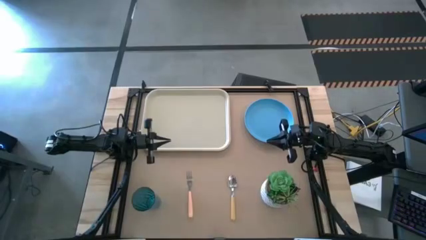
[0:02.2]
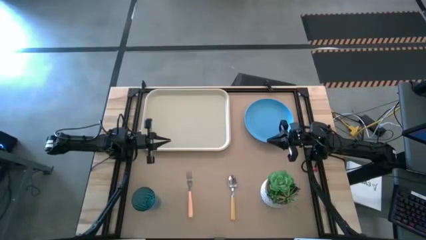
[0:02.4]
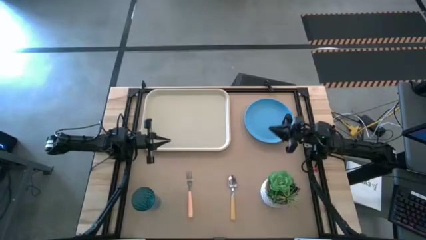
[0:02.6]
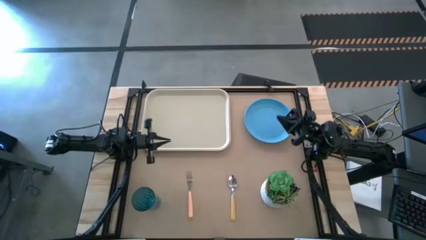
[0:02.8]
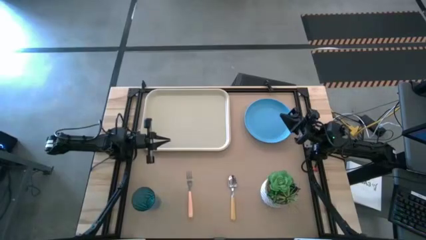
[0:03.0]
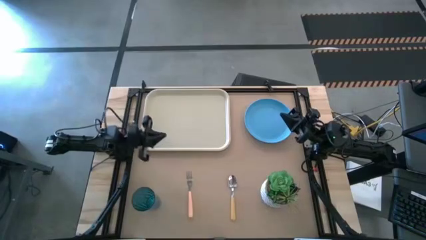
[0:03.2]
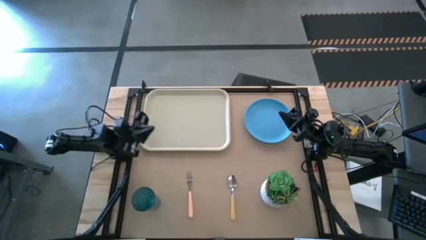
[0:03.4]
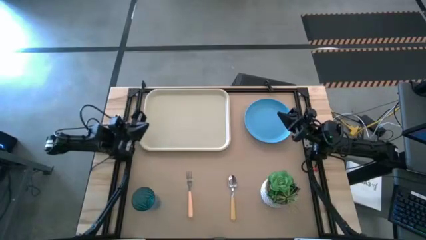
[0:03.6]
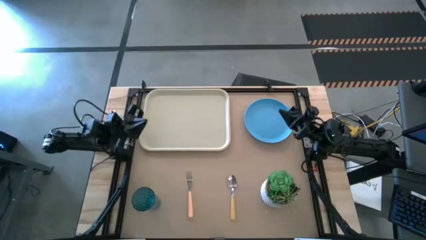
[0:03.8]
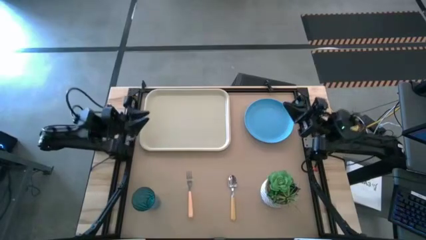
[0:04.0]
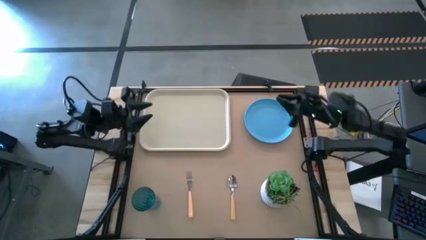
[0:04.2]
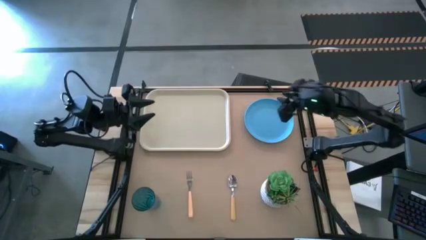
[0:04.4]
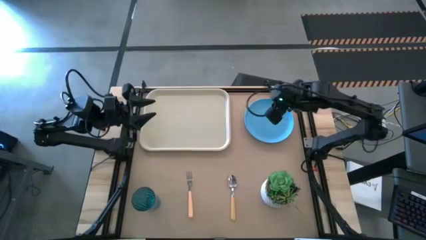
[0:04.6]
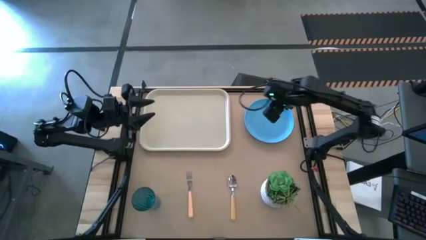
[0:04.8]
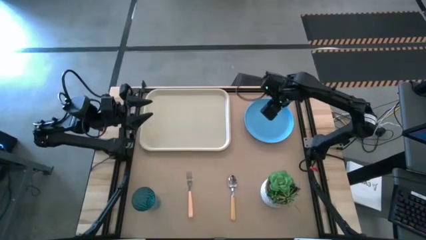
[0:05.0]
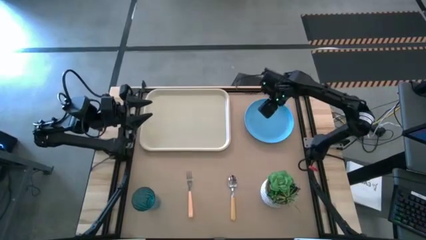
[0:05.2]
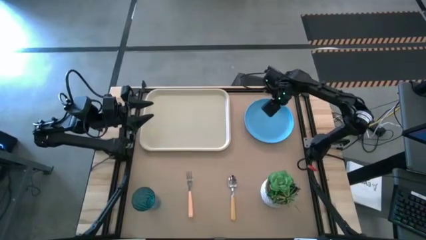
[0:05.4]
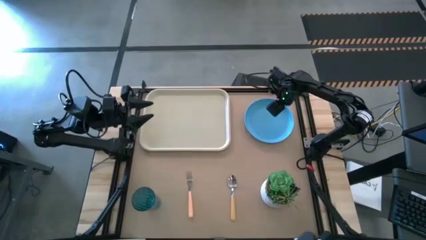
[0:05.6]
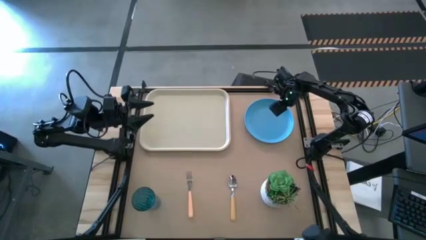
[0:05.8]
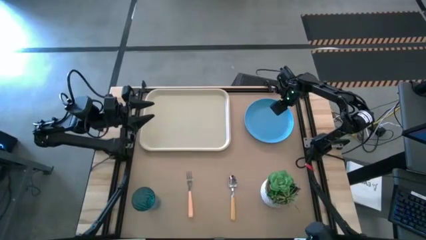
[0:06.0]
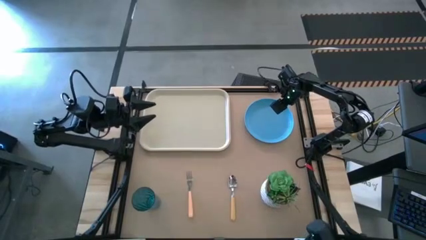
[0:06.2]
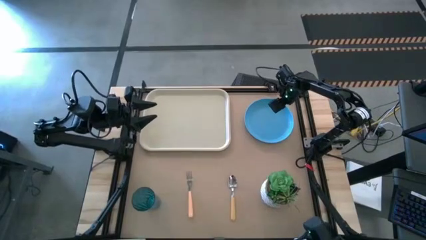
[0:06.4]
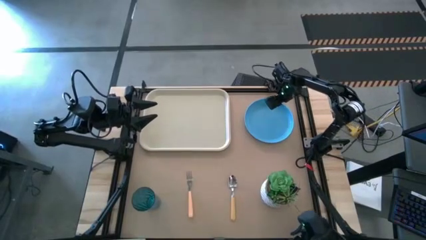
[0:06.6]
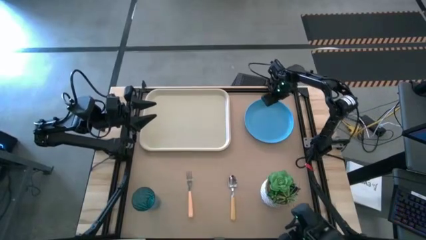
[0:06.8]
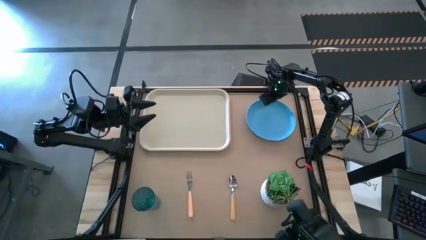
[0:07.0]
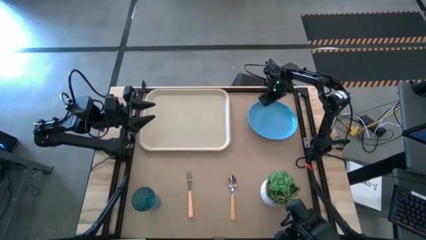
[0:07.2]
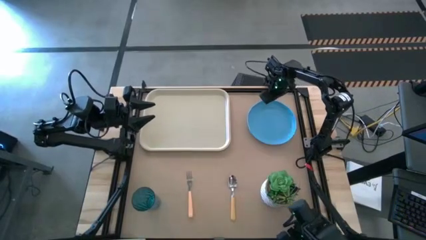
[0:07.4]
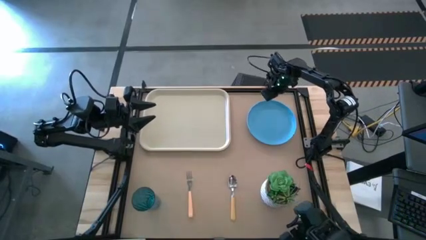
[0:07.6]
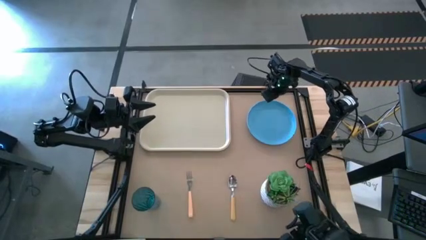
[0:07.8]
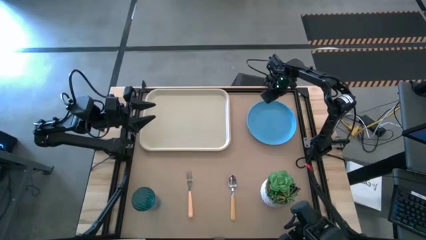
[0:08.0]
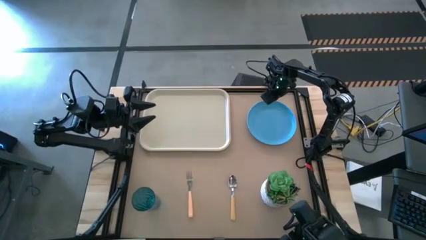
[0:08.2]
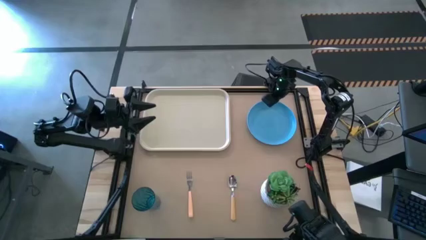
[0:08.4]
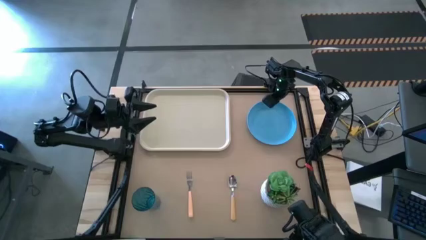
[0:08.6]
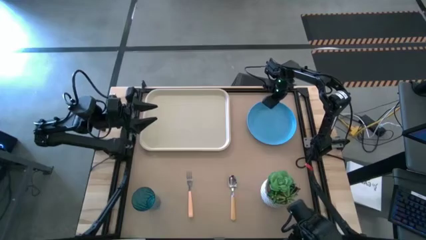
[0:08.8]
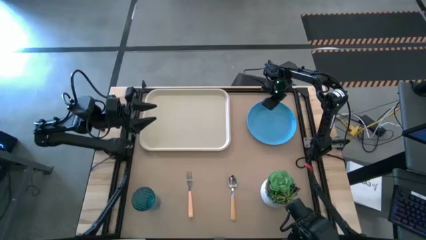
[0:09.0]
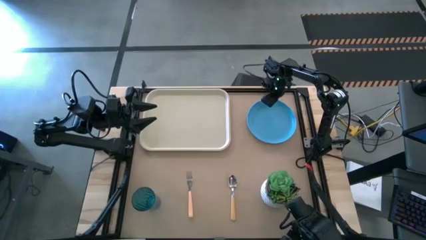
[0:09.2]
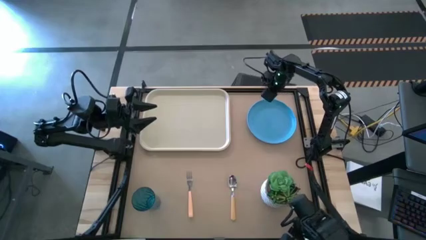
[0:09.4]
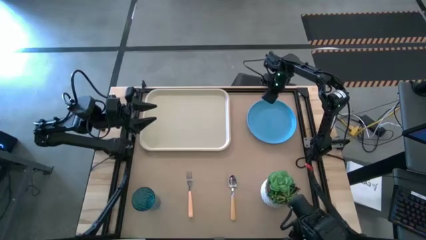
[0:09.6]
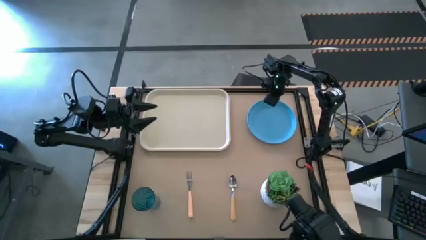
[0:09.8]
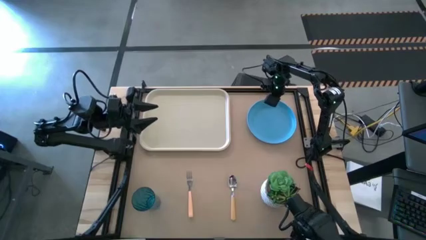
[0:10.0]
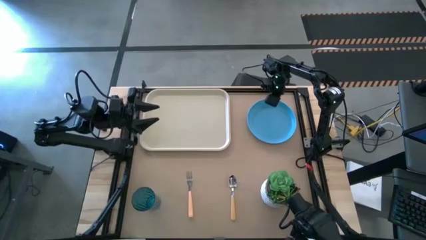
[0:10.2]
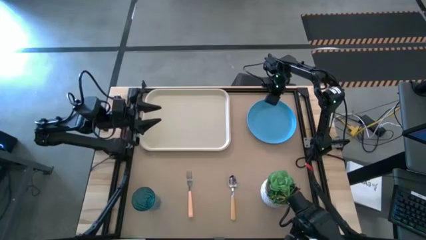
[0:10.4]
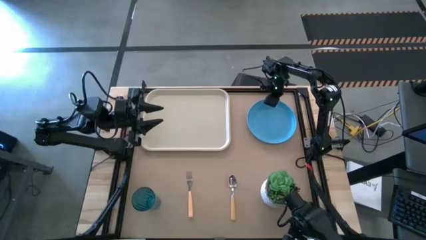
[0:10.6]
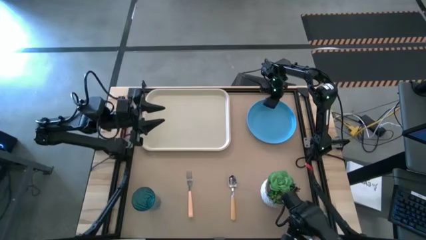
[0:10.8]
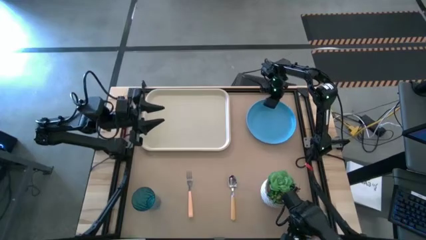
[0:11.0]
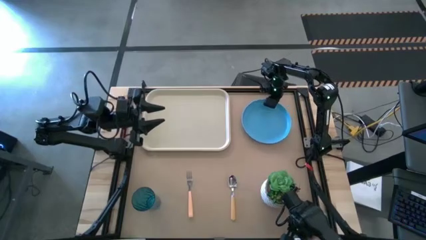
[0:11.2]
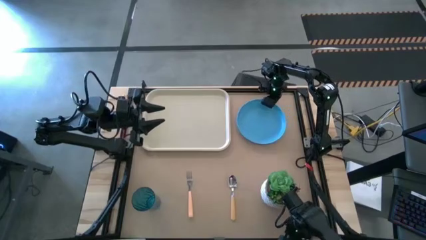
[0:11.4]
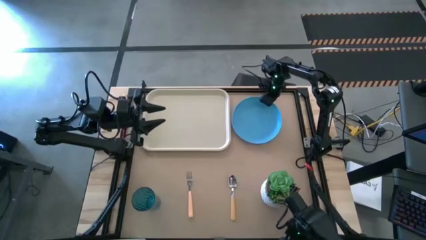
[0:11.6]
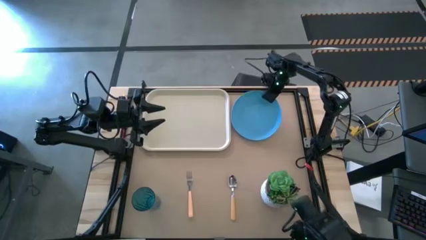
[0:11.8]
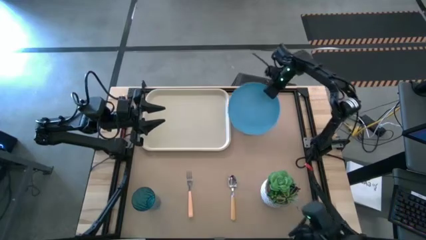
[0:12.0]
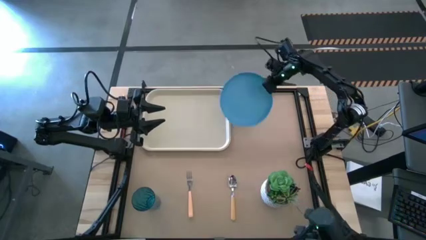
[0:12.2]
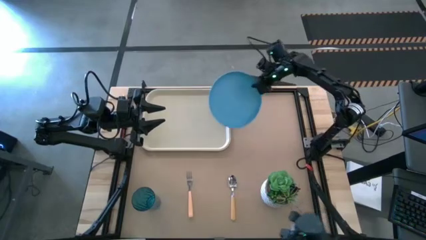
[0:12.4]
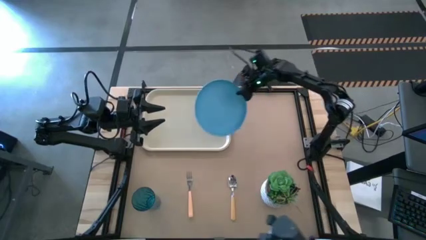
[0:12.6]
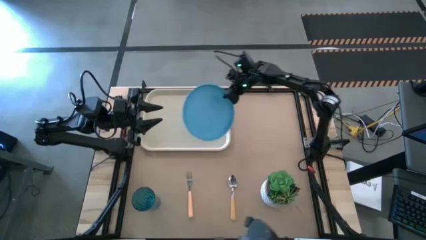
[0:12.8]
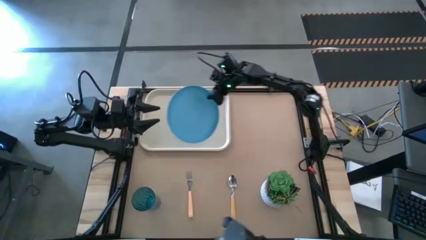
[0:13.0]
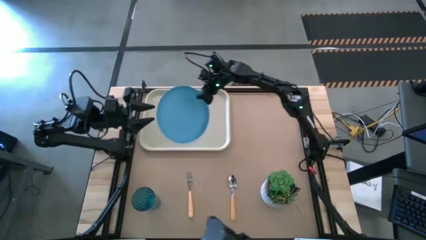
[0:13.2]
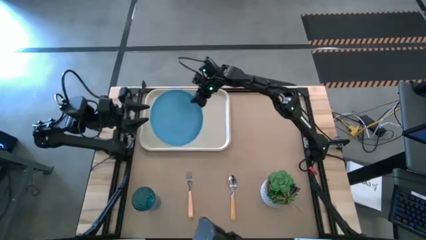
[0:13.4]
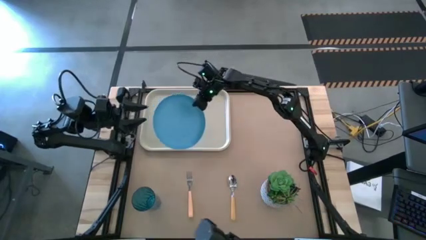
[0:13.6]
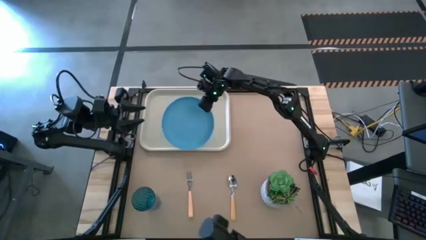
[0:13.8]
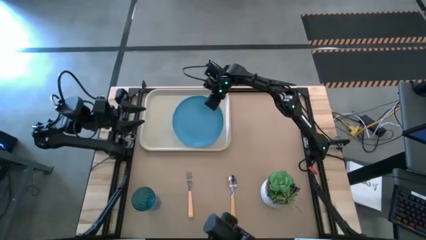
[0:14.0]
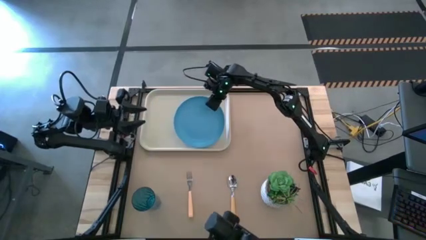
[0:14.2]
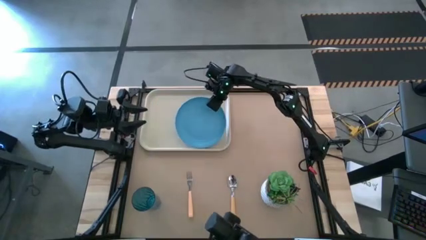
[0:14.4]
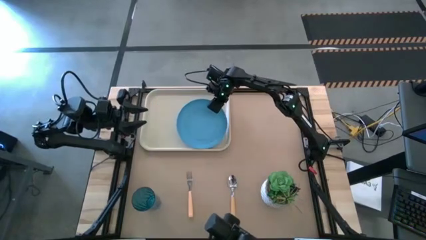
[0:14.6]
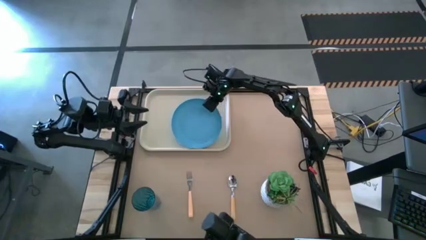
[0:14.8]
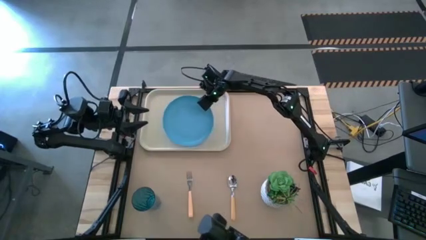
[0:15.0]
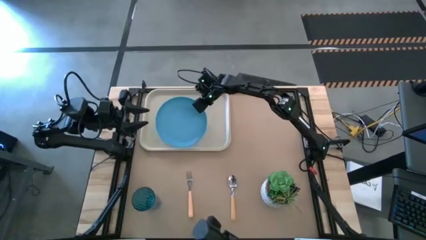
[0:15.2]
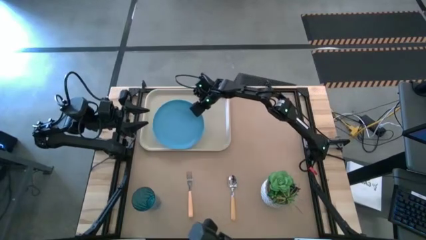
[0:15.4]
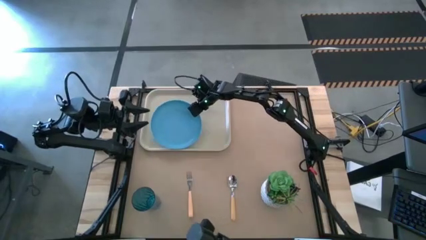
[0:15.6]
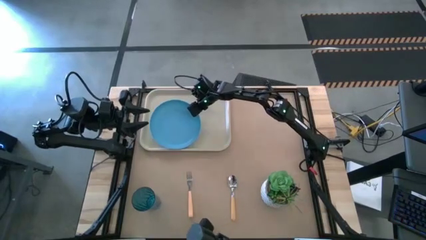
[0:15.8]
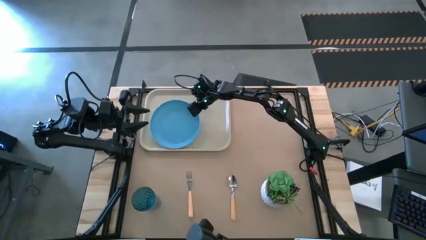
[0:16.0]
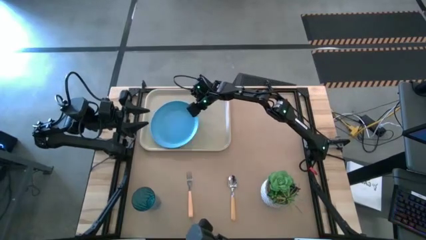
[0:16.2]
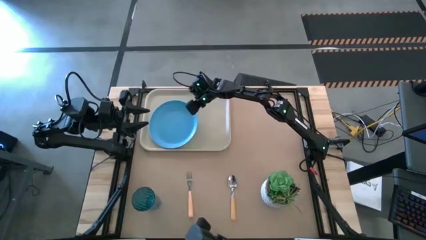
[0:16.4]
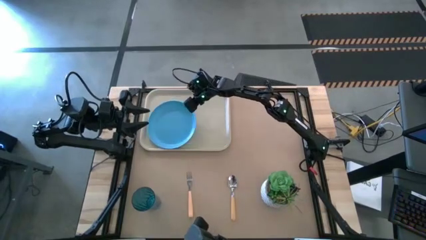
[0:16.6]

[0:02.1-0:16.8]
Task: Pick and place plate/cup/fork/spoon on tray
Put the light blue plate on the white serving tray
